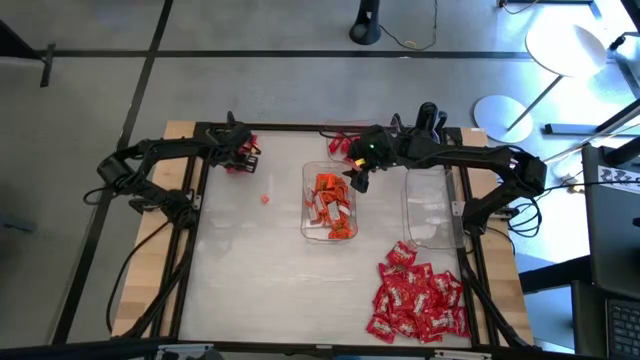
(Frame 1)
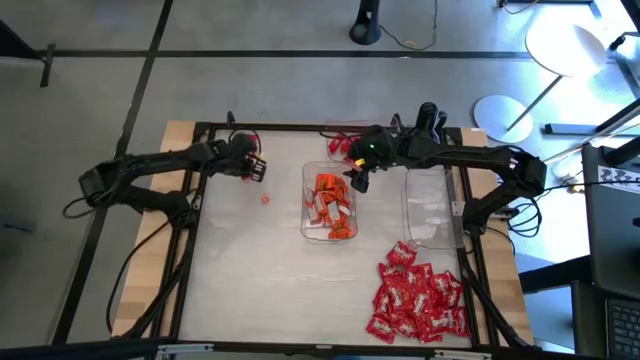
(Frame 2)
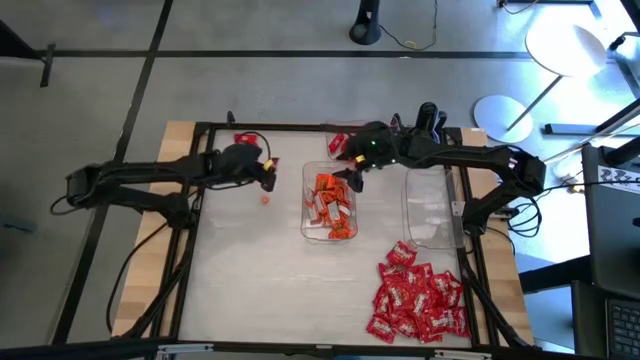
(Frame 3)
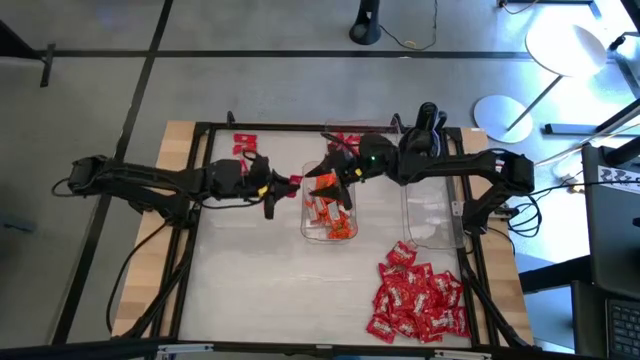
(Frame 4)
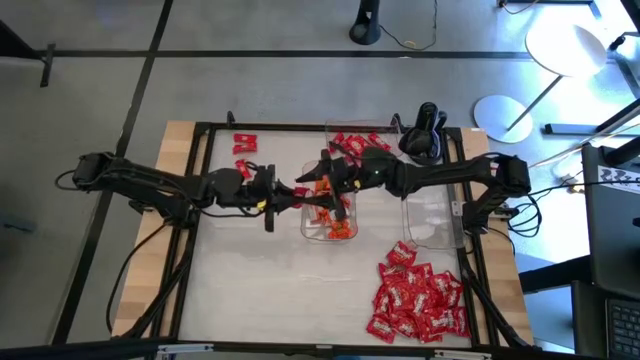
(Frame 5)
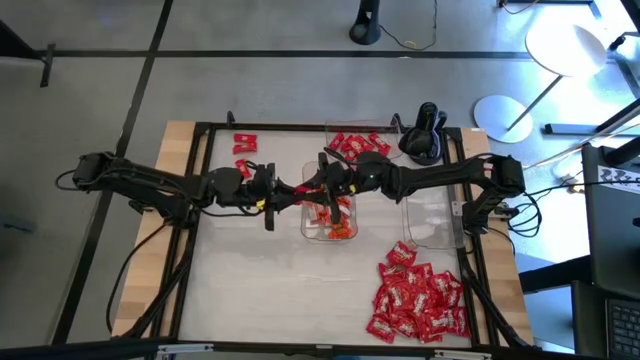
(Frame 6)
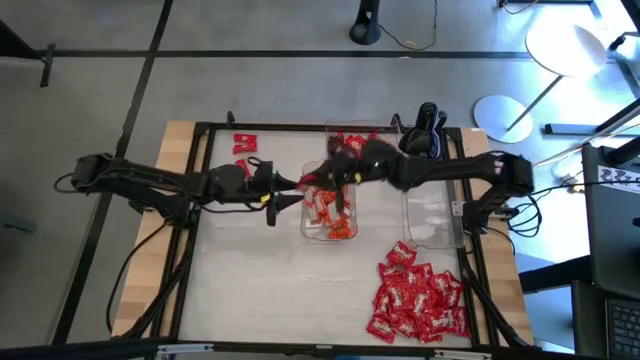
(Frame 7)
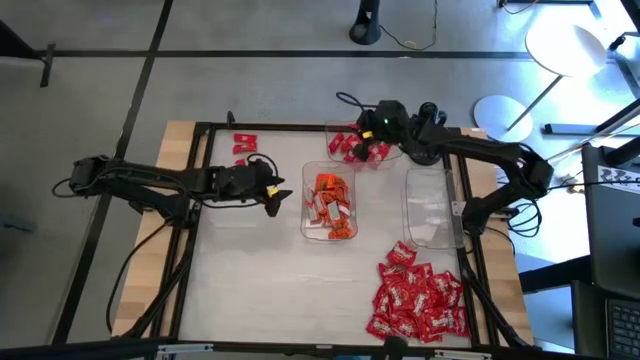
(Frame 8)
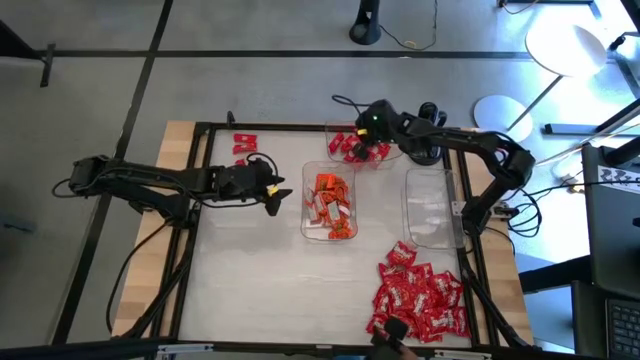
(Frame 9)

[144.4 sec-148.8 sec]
Task: Sort candy
Put the red chocolate into the top transparent bin

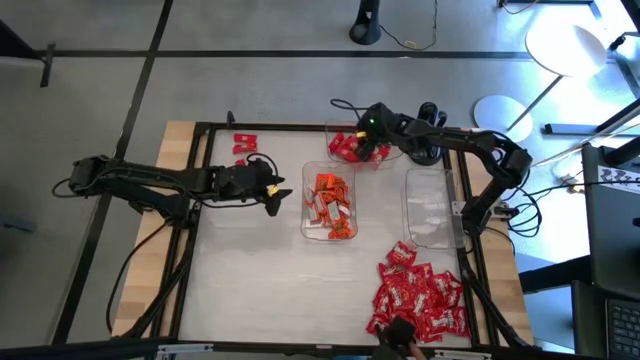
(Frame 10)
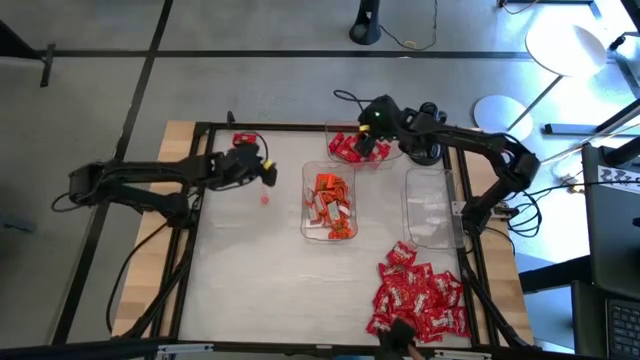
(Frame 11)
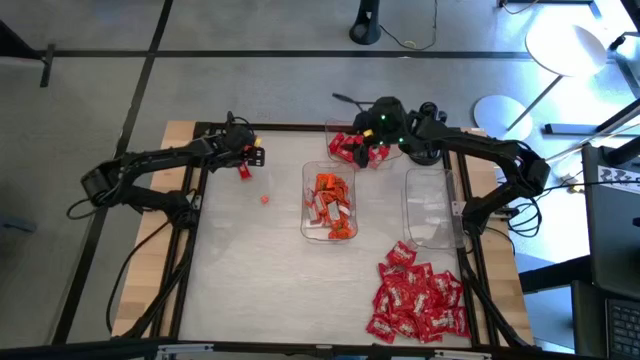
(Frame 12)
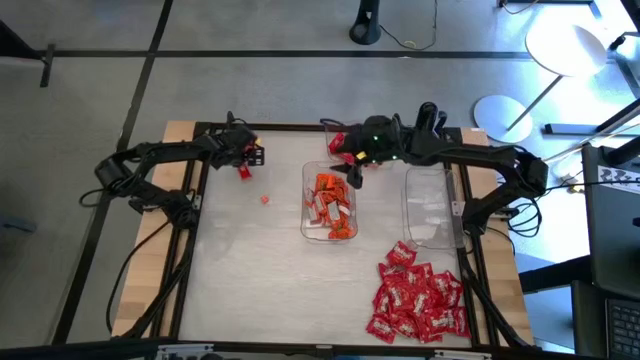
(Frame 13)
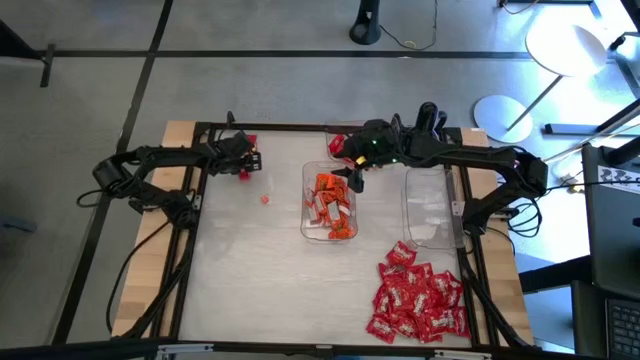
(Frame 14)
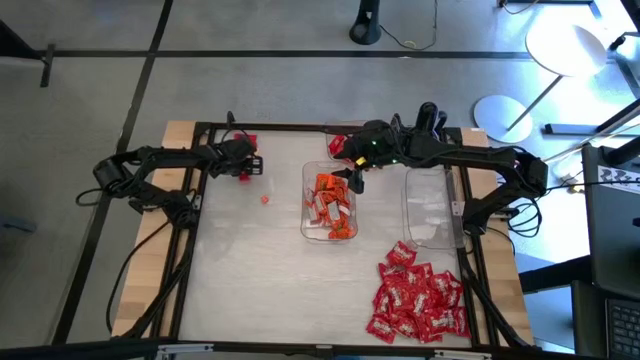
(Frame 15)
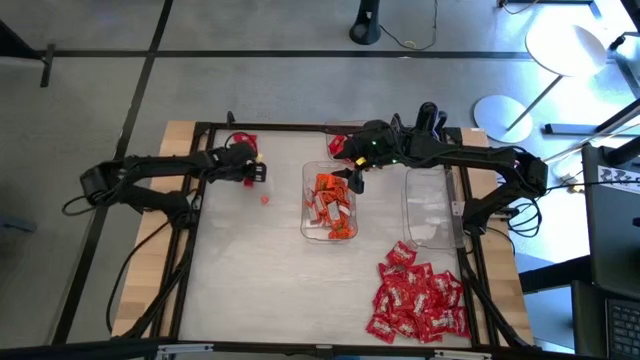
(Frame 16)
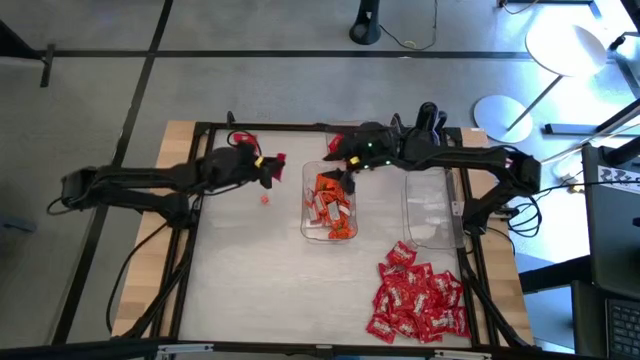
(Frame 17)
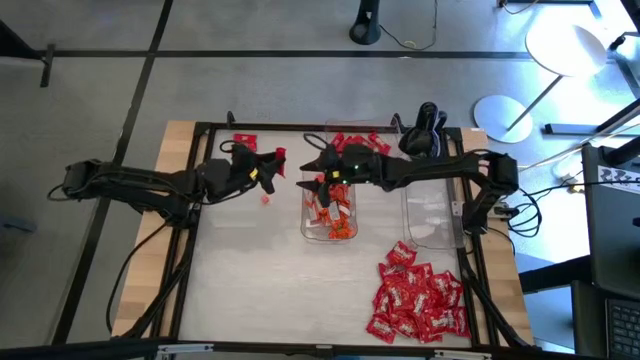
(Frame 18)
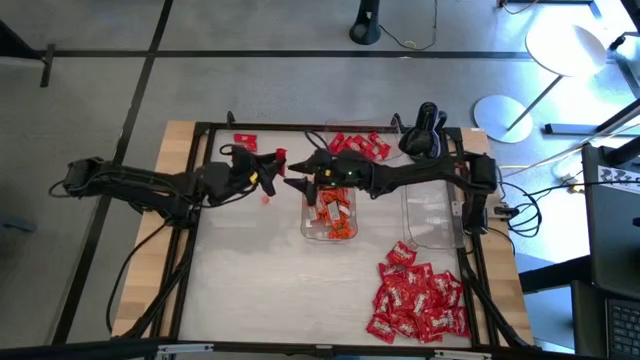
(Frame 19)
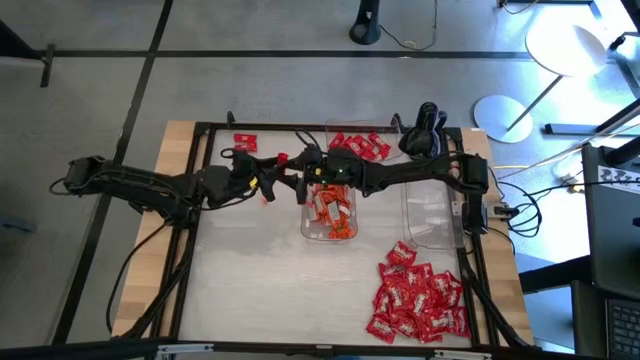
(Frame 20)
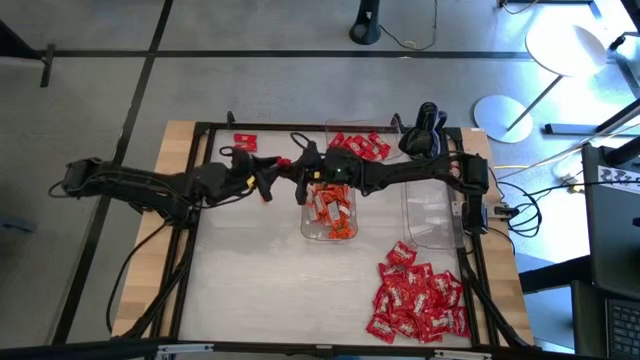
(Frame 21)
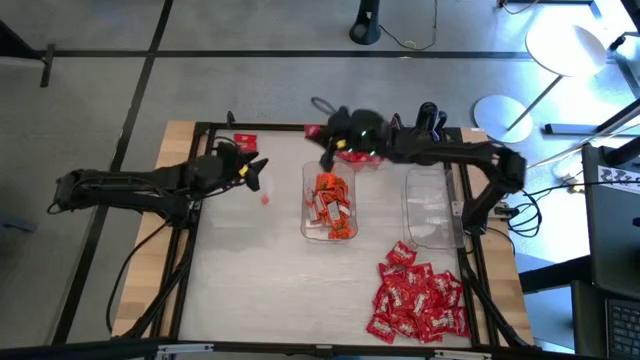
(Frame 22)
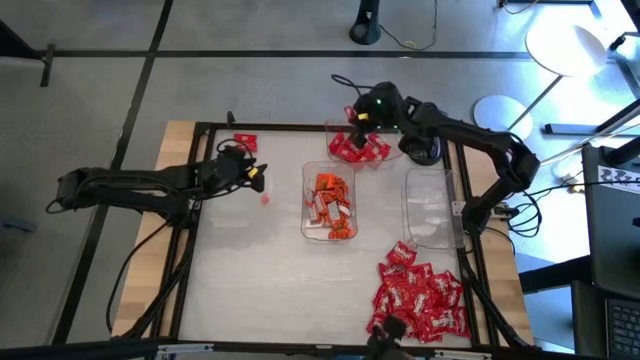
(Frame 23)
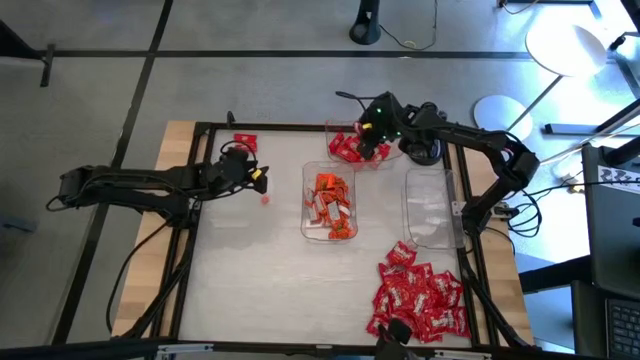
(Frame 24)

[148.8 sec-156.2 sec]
Put the red chocolate into the top transparent bin

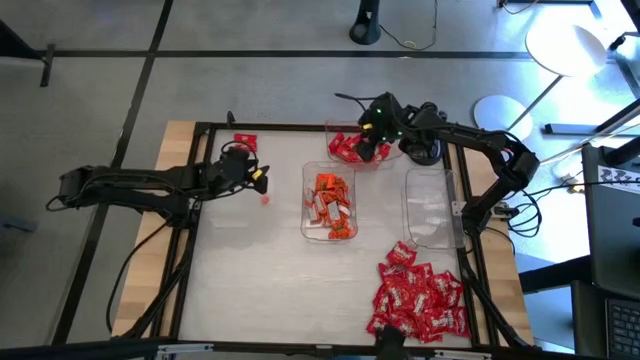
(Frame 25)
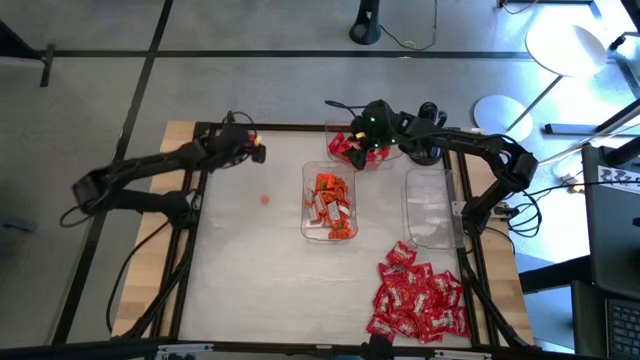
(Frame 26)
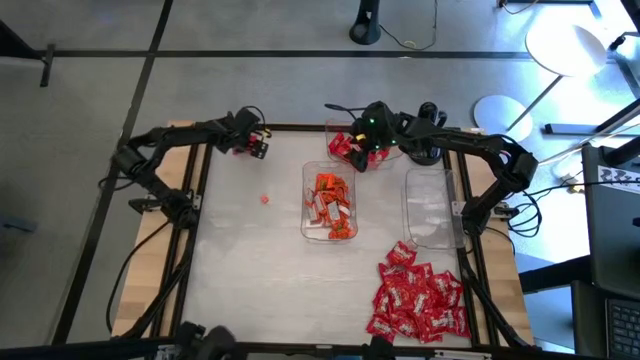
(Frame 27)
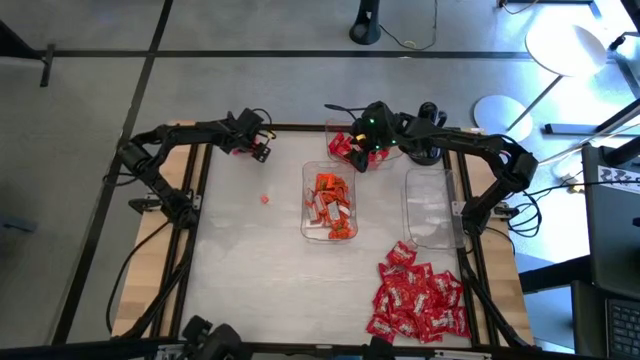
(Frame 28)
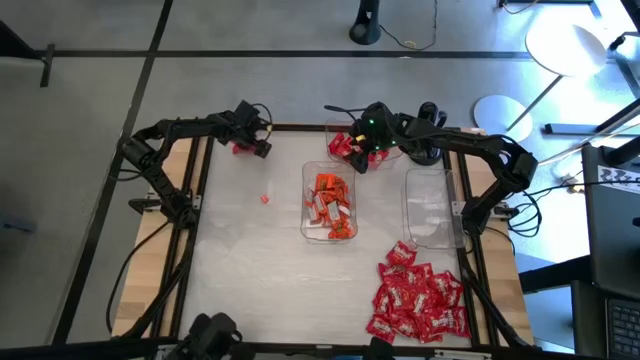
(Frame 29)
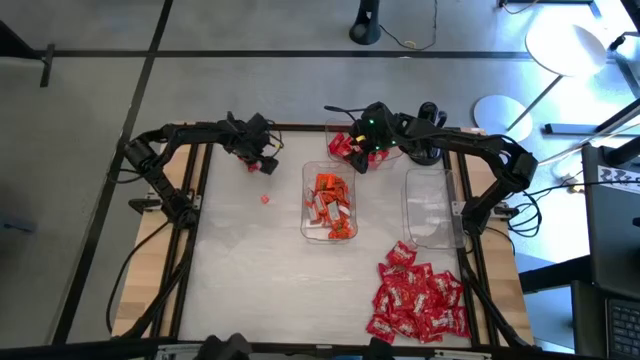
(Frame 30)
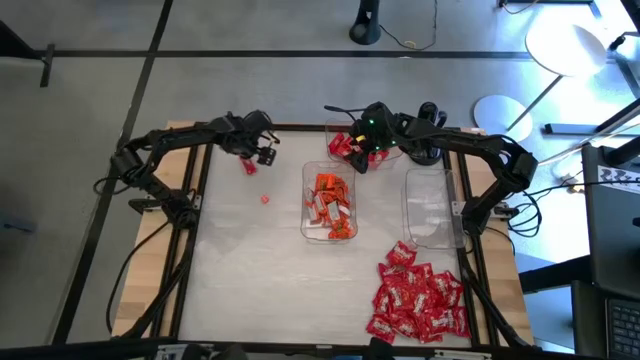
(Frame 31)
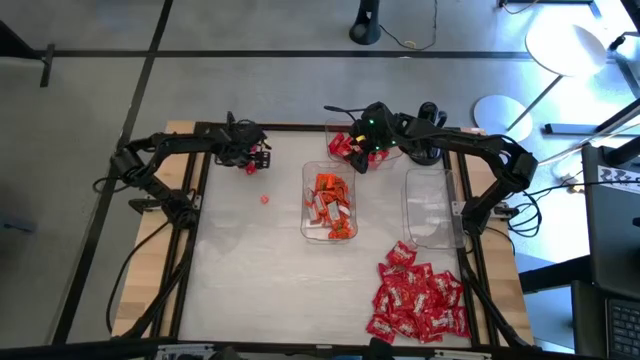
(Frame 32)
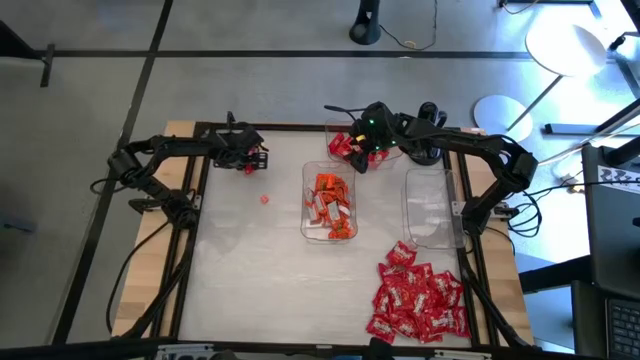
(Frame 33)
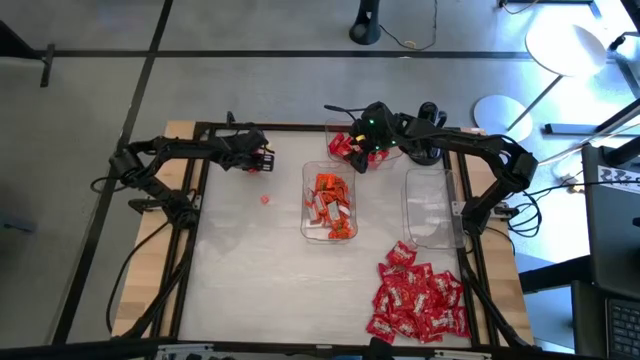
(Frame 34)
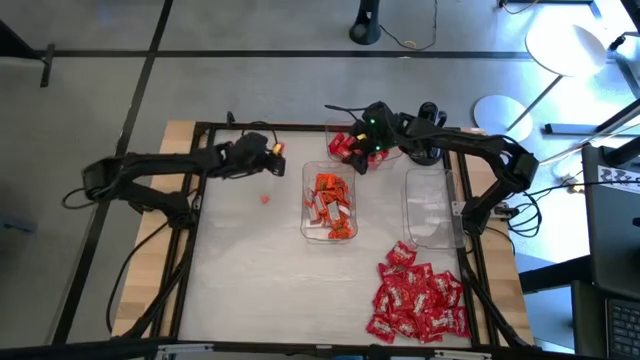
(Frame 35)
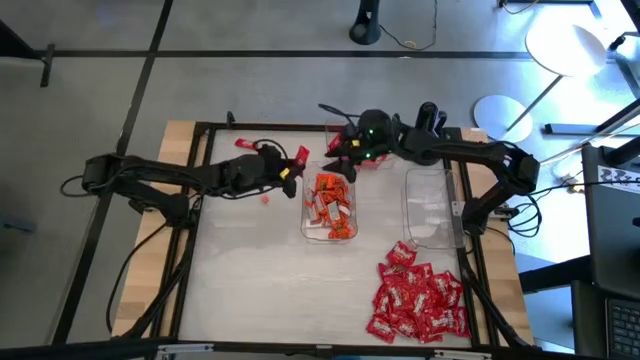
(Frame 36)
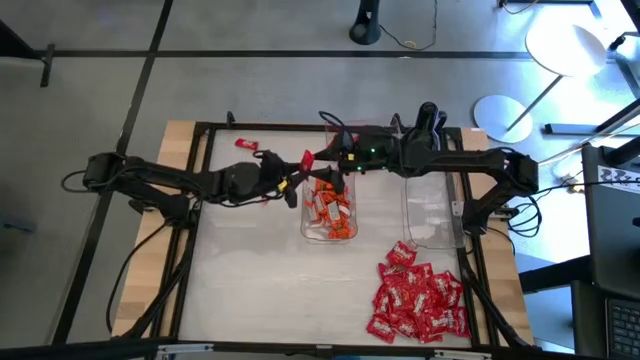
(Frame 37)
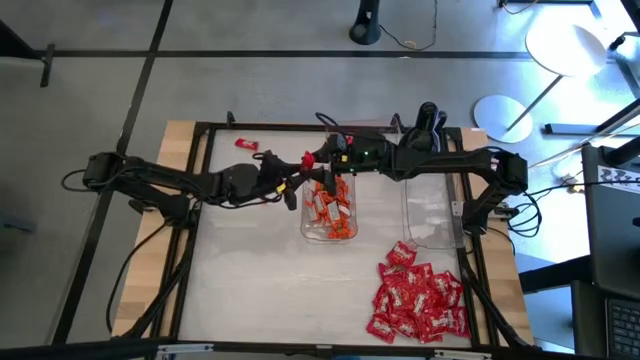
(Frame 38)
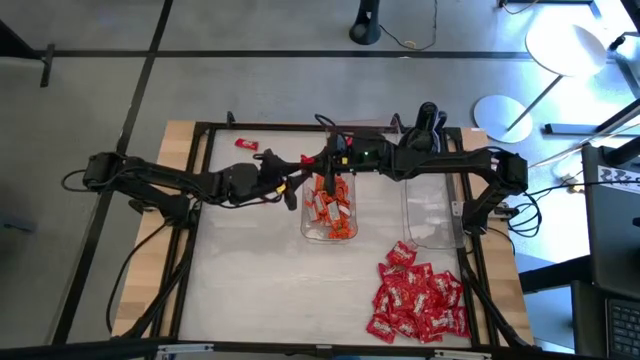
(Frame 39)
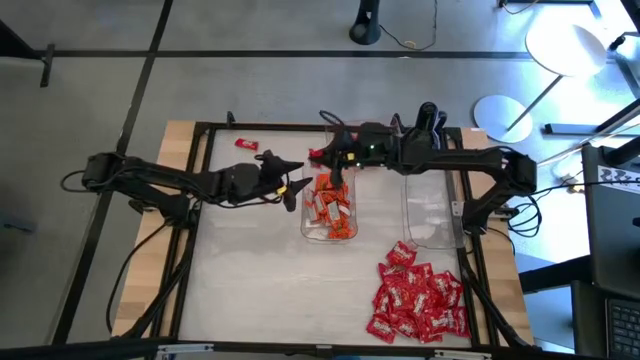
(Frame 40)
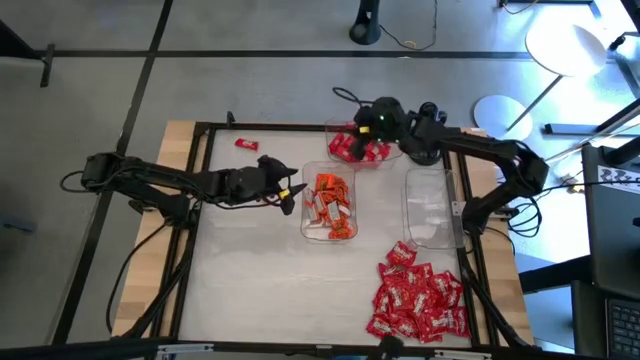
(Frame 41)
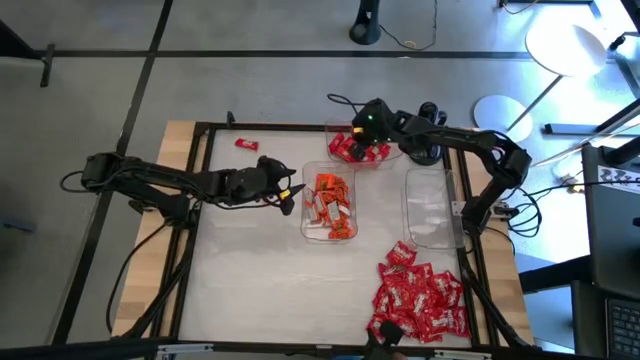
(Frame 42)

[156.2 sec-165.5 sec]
Put the red chocolate into the top transparent bin
